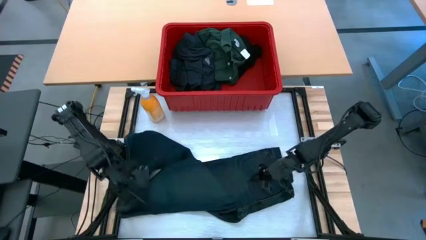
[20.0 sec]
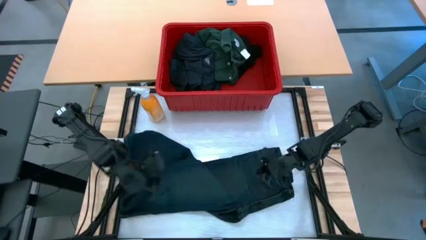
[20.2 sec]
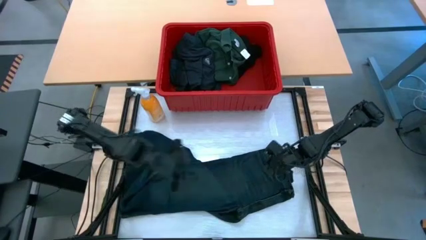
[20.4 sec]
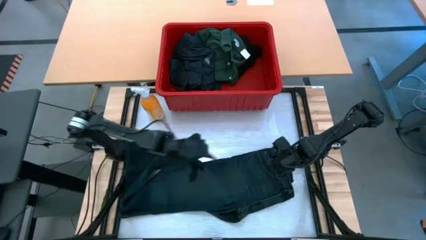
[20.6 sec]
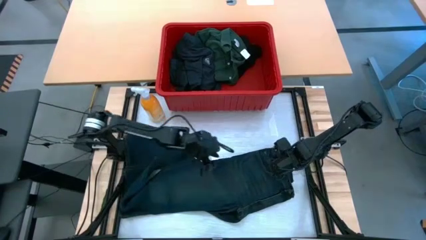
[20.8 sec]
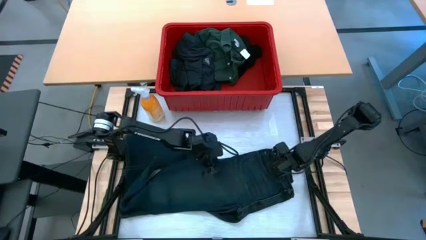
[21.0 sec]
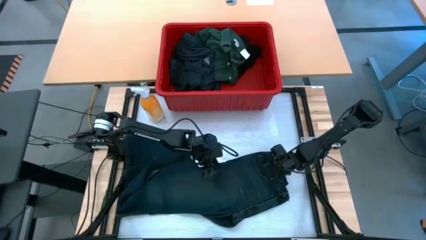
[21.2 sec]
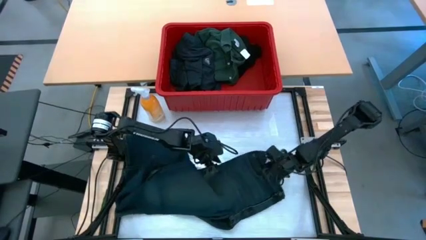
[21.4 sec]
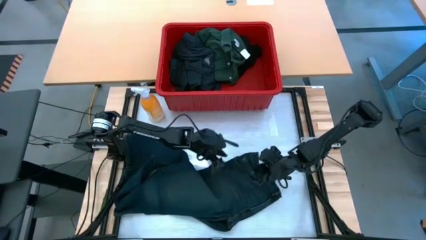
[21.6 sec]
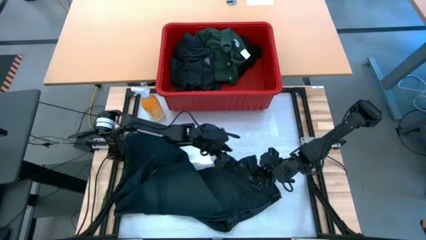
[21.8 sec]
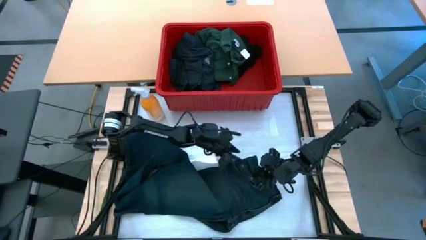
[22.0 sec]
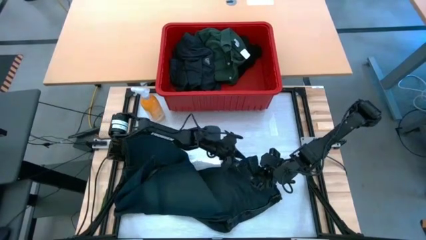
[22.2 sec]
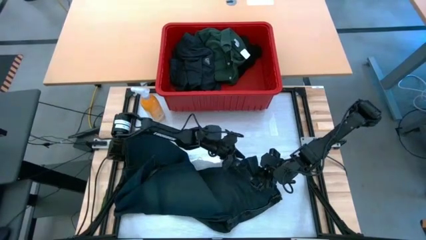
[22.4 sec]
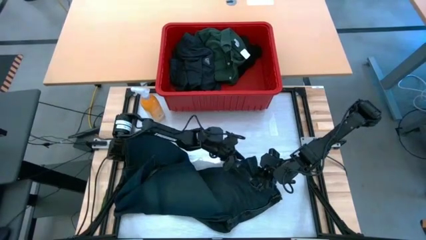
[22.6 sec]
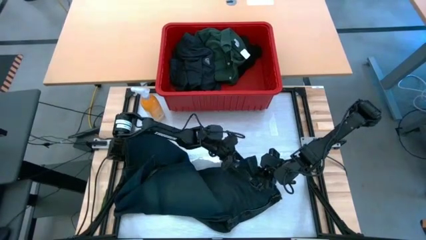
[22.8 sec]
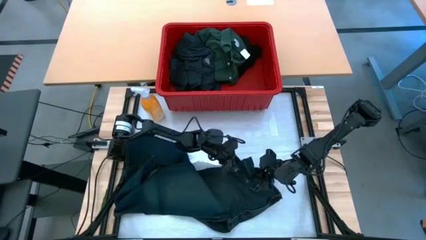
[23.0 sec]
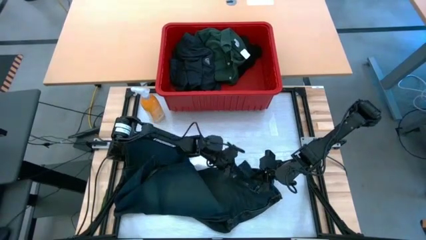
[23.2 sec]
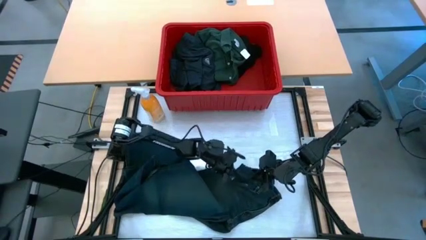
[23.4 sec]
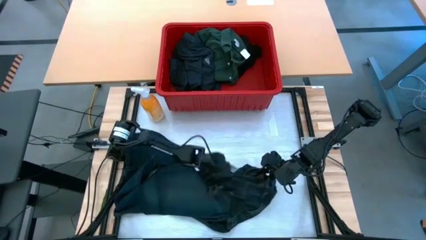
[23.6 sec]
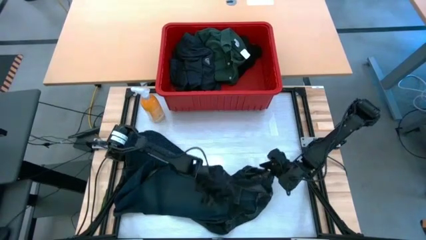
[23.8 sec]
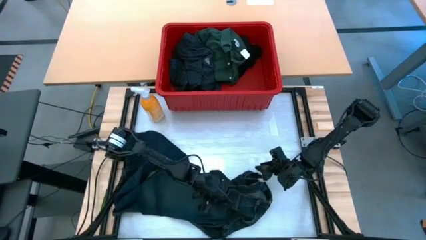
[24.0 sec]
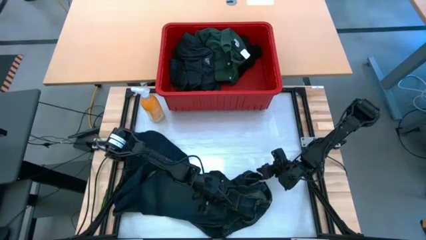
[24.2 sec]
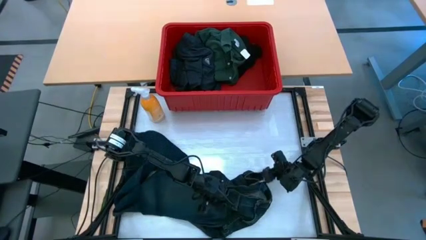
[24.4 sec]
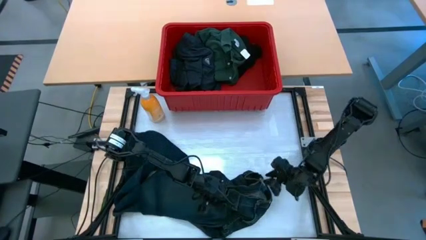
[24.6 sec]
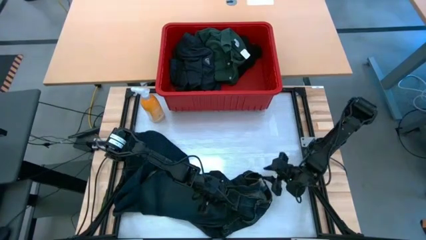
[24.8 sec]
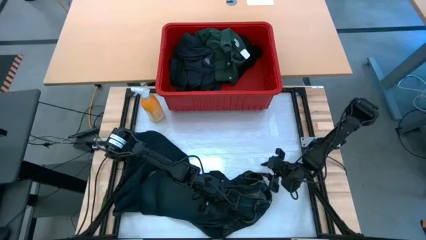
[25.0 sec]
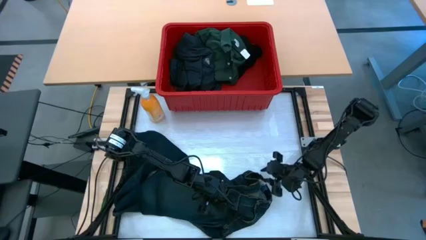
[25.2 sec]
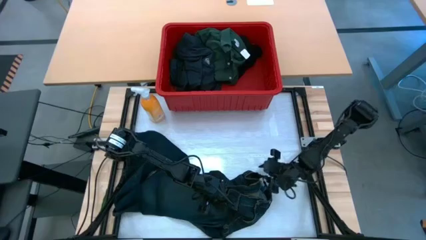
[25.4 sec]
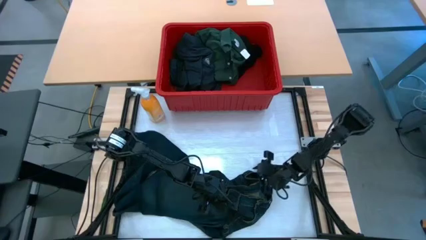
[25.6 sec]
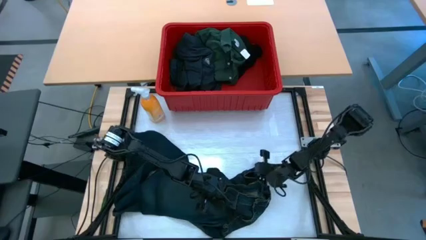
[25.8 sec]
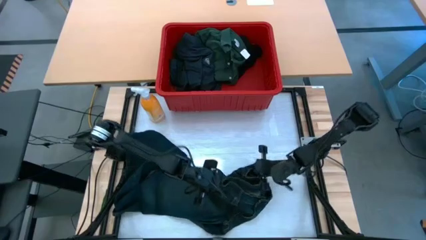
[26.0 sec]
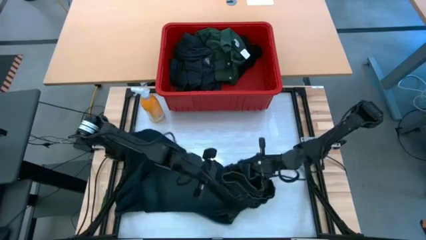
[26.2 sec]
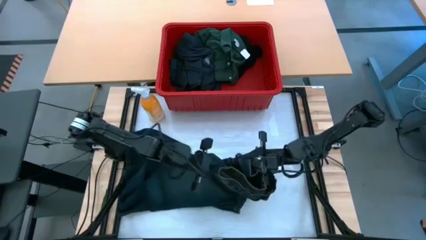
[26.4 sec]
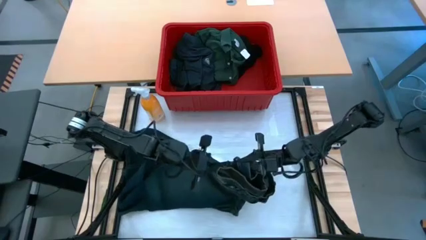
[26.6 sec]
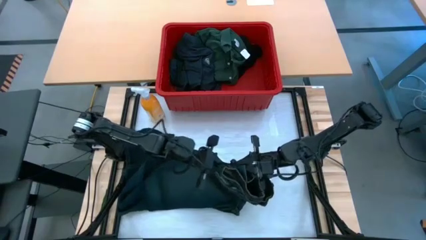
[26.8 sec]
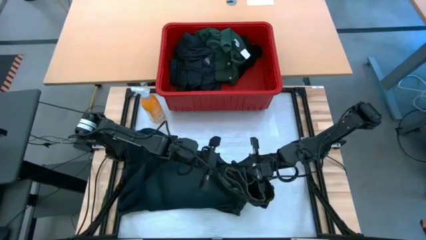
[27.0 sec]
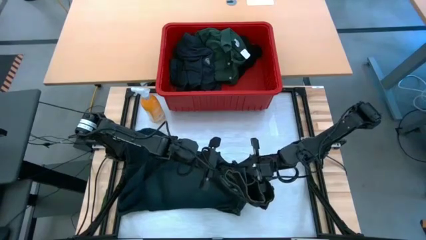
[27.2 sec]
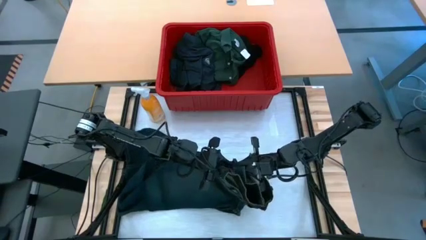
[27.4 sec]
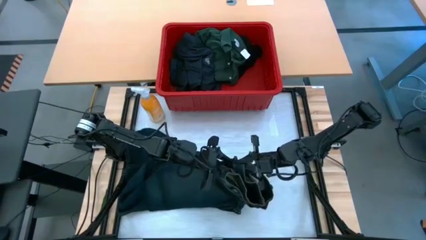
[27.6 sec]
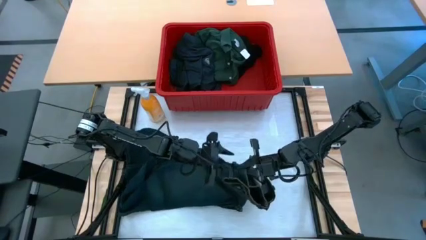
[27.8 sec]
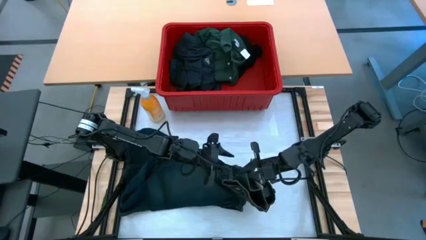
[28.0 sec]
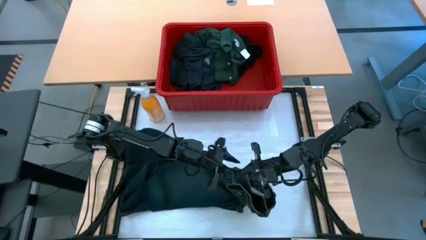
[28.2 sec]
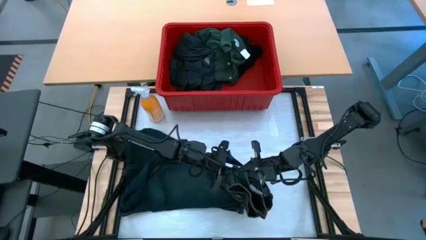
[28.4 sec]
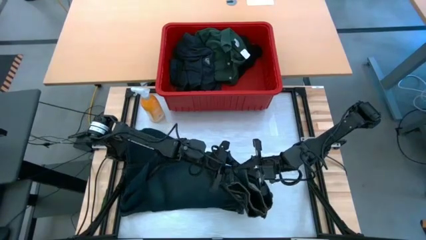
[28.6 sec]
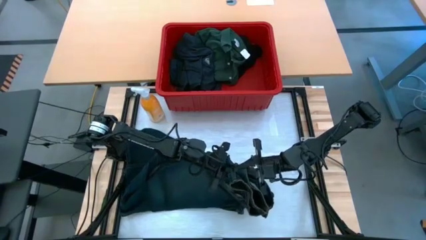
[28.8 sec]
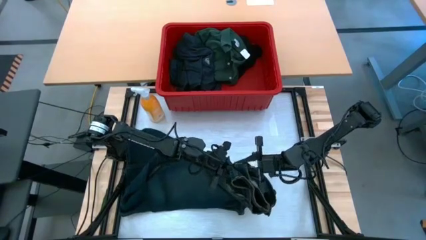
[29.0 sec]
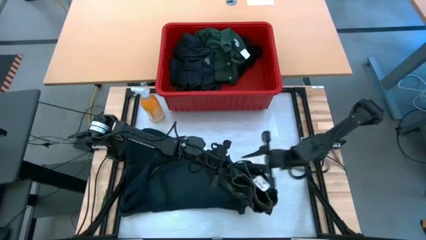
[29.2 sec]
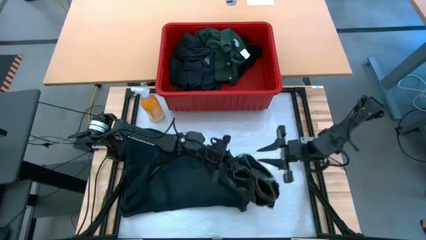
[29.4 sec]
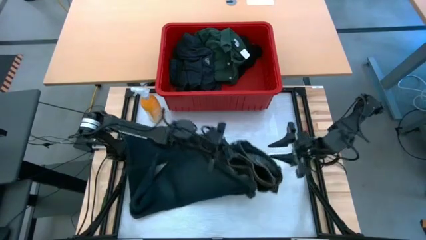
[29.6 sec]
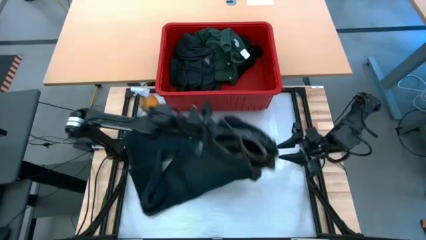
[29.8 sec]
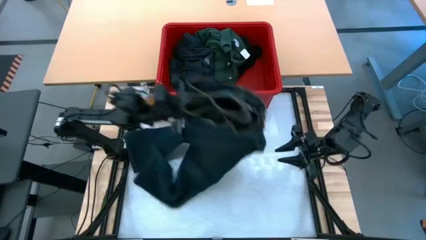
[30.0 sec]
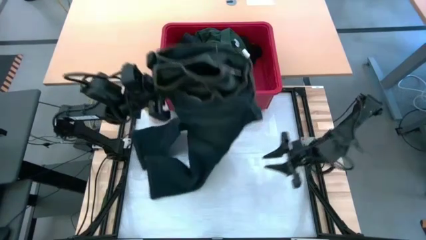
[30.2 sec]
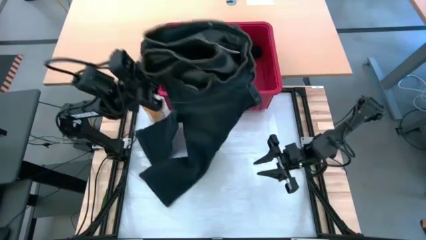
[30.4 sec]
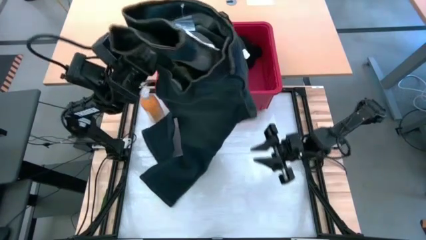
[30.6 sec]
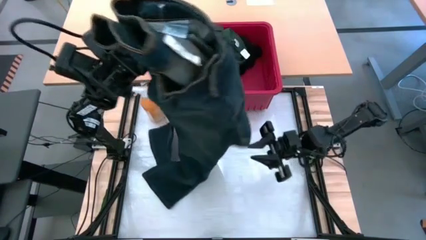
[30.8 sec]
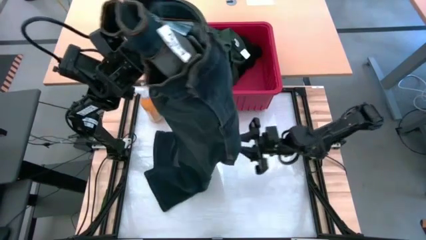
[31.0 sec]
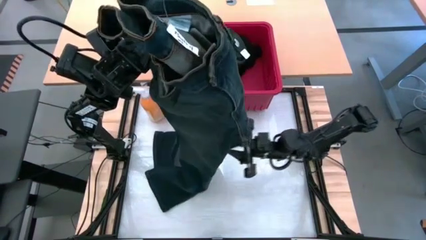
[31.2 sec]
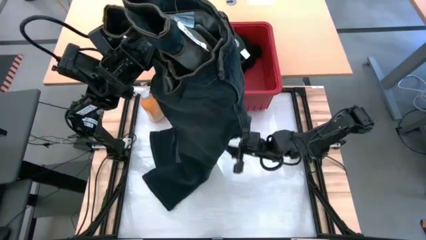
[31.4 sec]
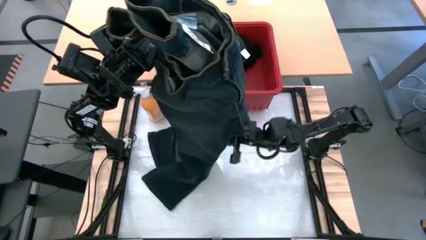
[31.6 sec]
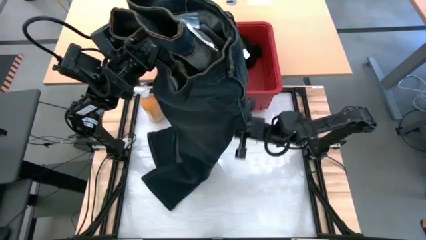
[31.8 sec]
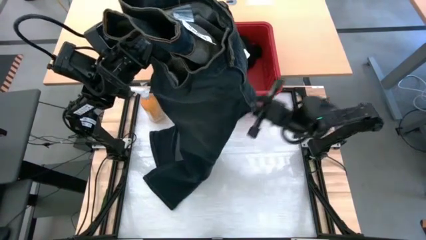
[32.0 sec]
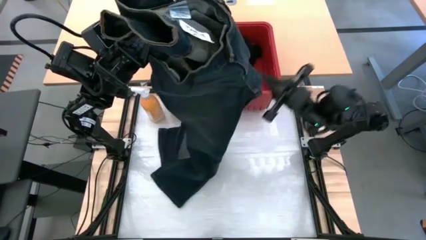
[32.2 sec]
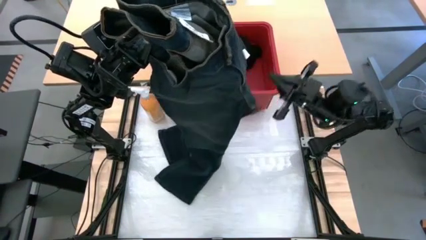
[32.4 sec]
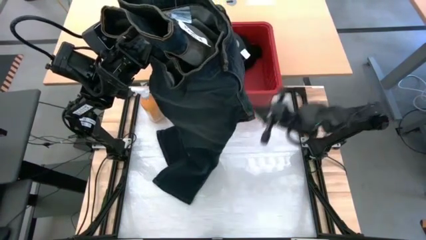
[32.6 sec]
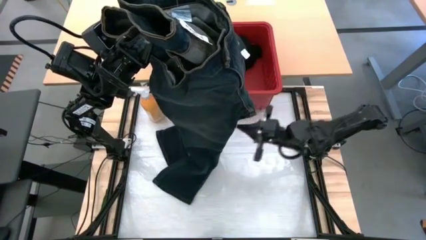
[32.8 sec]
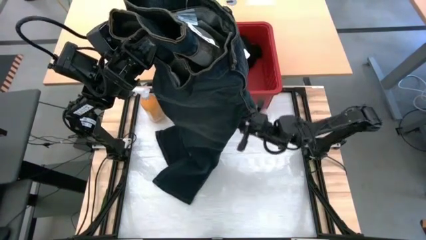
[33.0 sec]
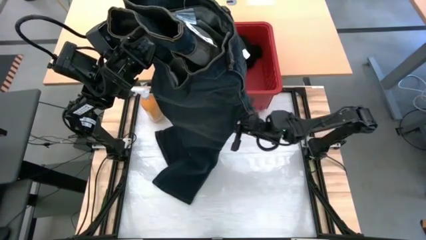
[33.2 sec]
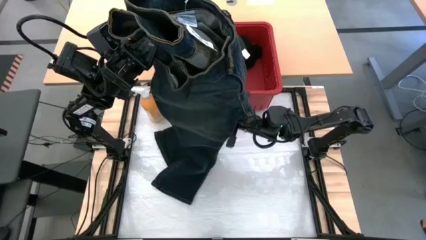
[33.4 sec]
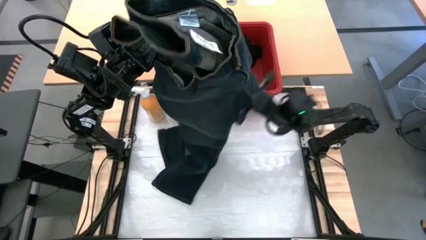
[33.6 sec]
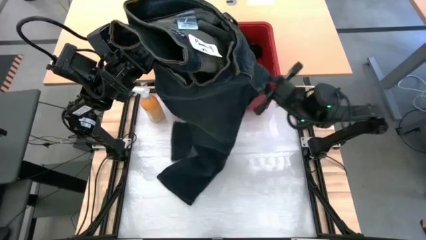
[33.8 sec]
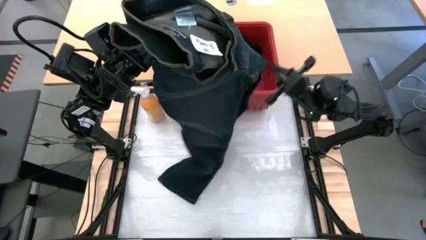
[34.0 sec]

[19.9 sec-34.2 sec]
Task: Fold laundry
Fold the blue pants
